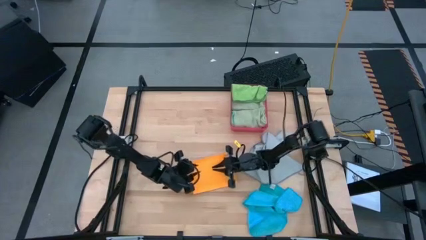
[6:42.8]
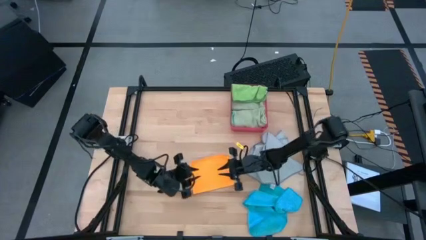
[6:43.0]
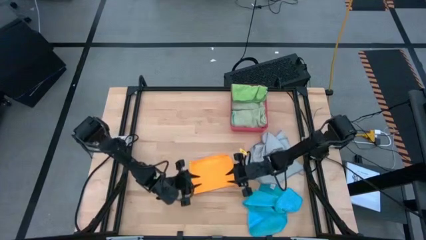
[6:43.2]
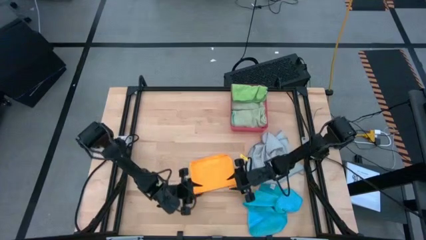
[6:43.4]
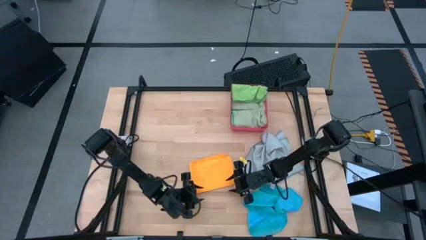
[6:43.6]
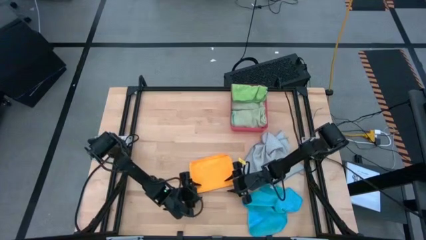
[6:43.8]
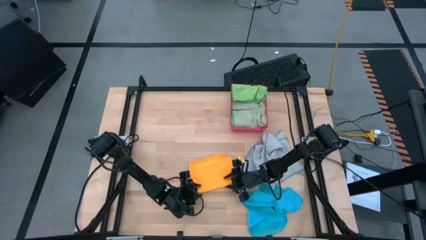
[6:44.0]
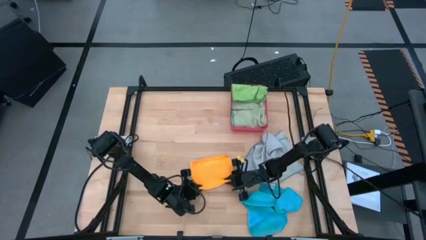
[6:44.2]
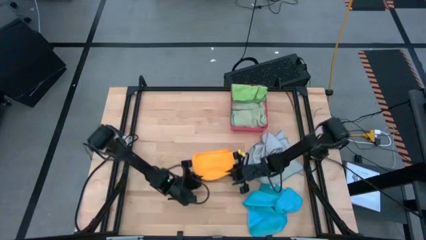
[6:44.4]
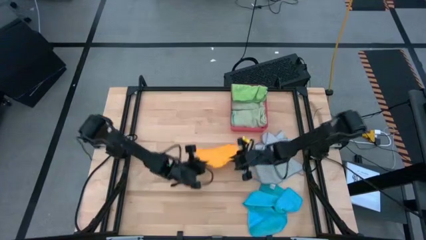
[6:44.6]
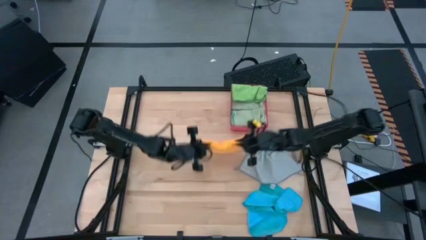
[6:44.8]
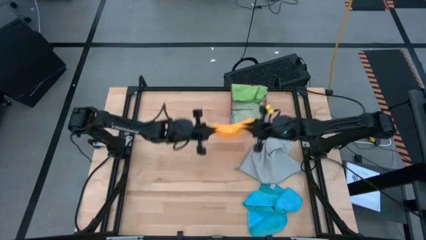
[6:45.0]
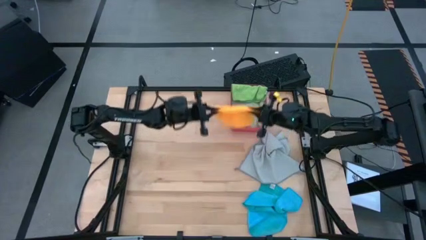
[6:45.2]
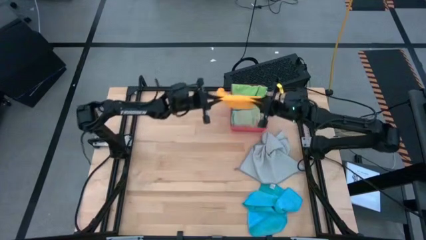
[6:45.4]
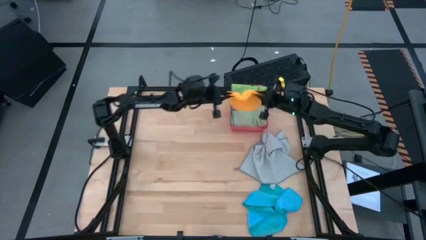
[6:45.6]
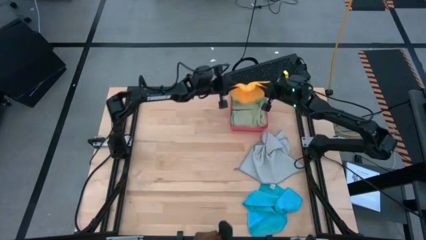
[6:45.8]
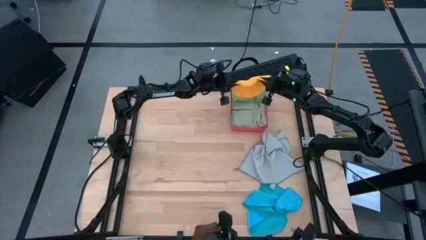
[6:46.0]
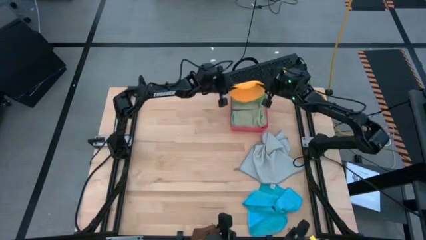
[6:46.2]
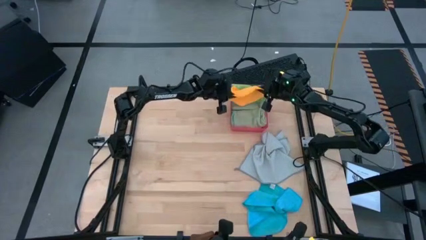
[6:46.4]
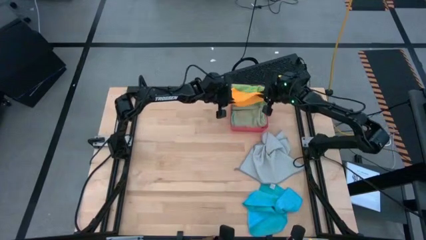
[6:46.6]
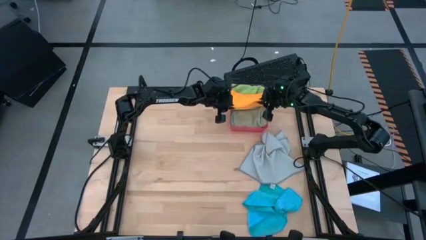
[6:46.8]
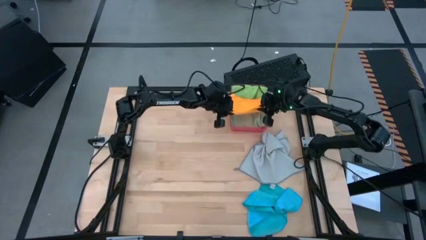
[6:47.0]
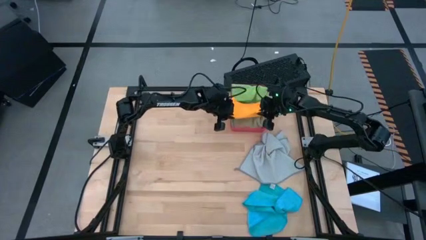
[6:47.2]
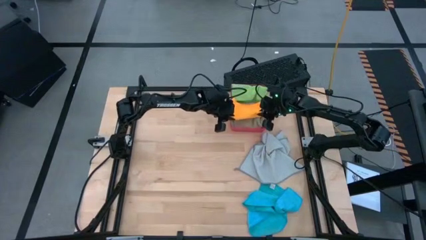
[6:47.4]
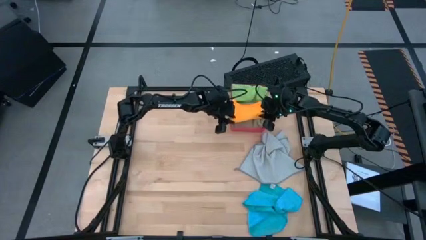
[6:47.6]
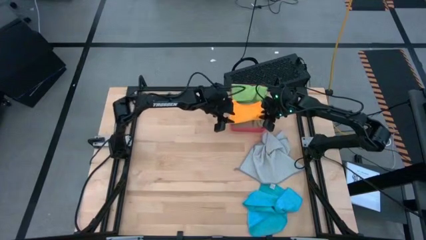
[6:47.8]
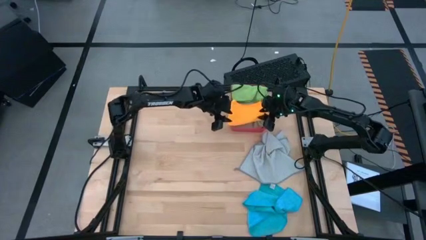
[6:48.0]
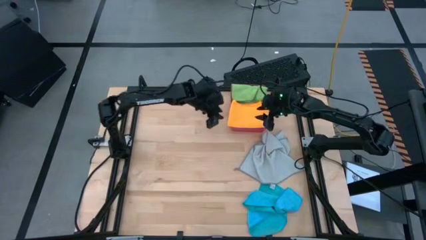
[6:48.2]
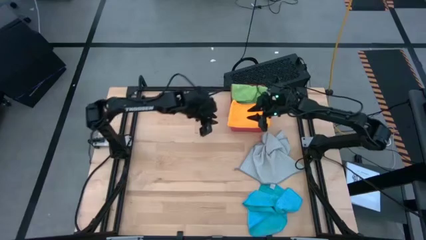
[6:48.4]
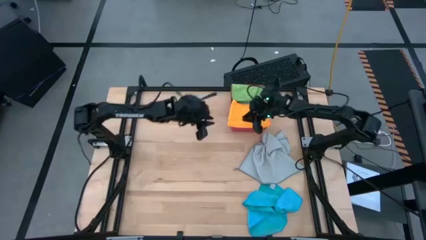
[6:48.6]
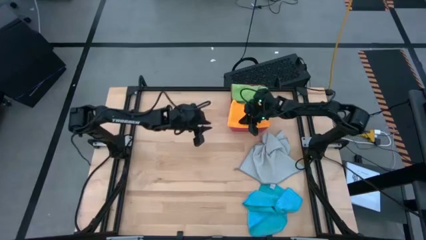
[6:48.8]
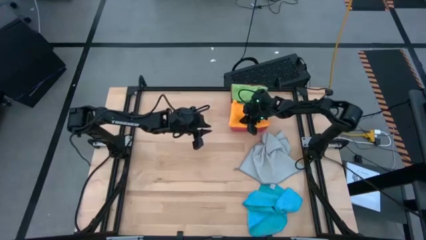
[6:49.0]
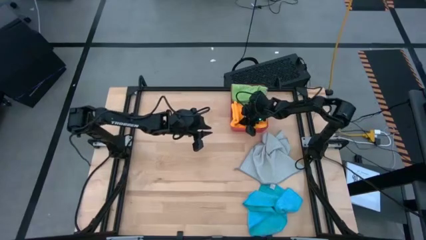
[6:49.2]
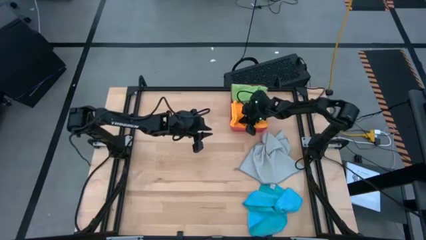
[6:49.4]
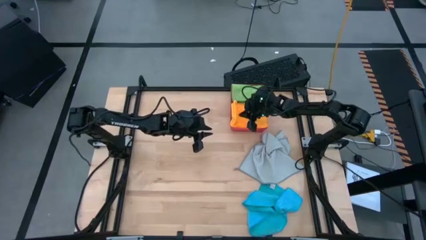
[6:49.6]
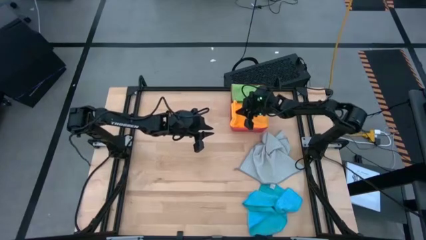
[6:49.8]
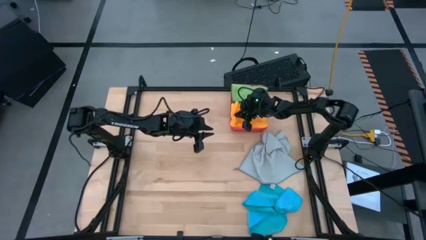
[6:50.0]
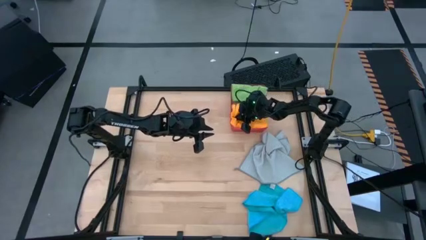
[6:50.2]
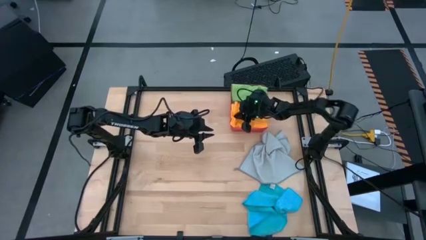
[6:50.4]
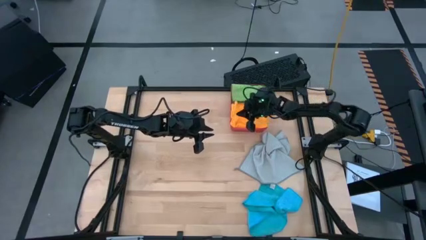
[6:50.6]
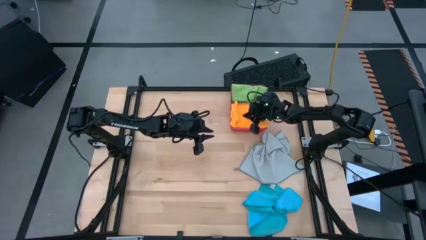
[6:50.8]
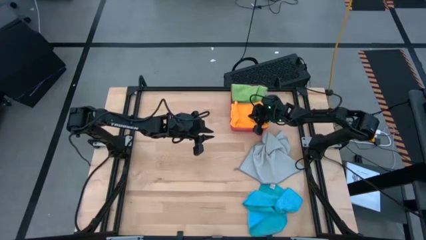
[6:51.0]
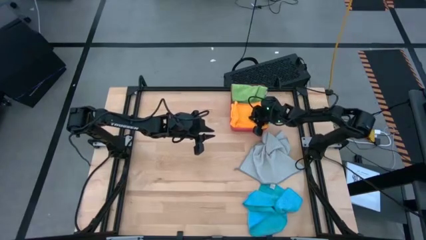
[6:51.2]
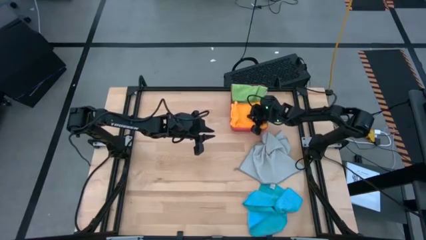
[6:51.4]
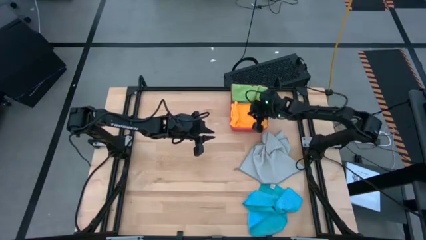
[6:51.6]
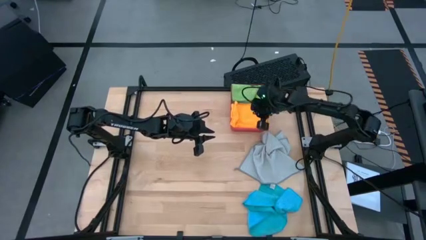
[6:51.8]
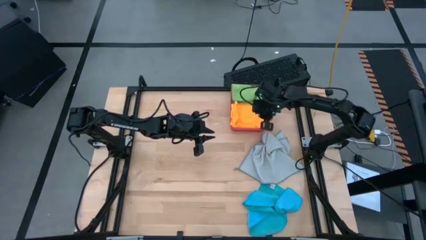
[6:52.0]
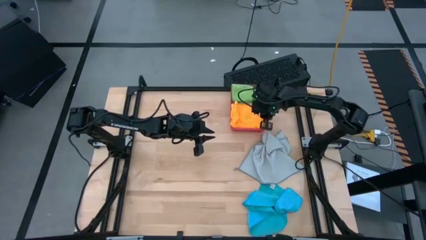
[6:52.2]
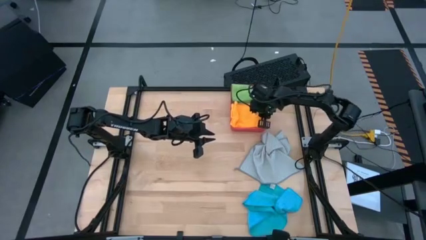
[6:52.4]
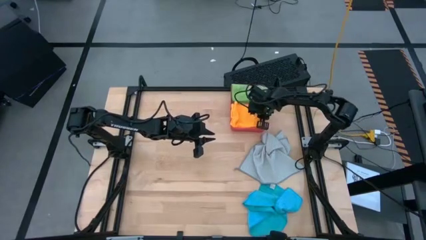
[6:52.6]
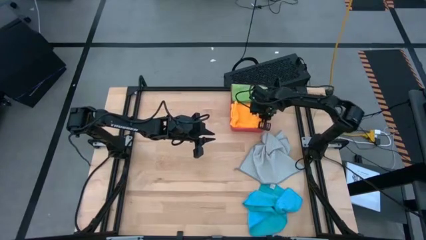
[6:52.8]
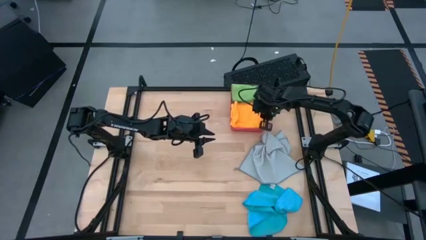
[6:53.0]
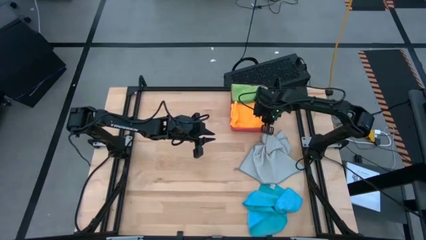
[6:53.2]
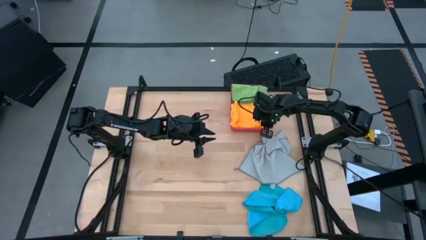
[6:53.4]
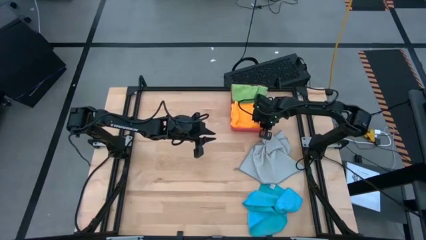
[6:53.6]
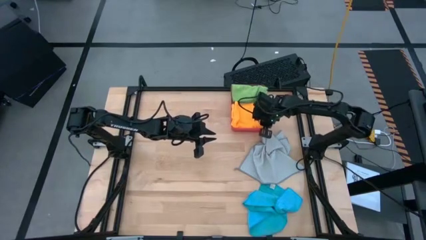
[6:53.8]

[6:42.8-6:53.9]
Task: Fold microfiber towels
Stack the yellow microfiber cloth on top of the bottom light green microfiber cloth in the red bin

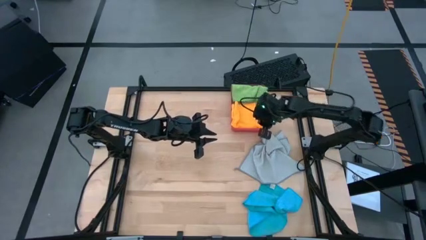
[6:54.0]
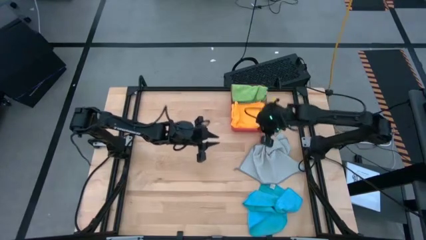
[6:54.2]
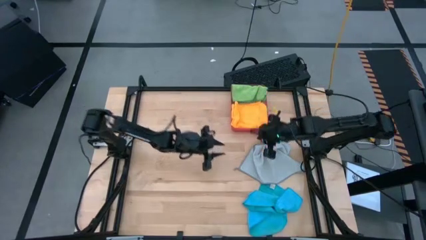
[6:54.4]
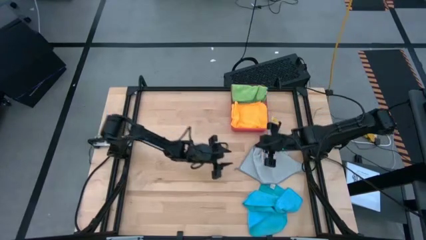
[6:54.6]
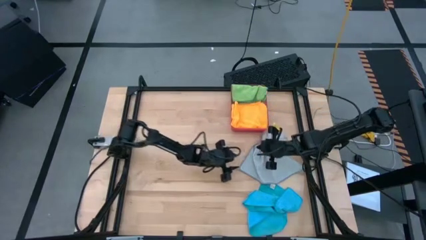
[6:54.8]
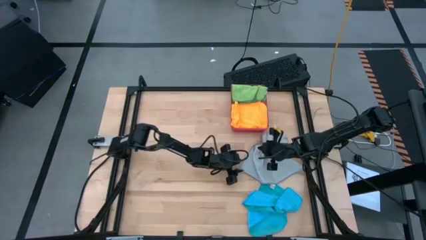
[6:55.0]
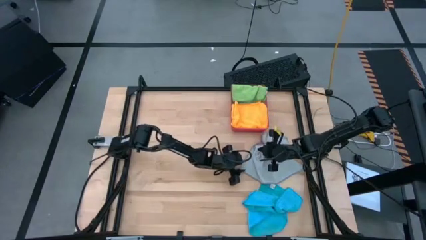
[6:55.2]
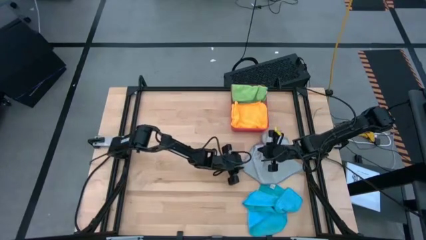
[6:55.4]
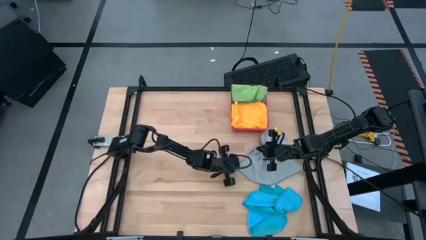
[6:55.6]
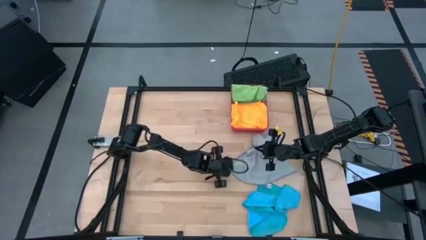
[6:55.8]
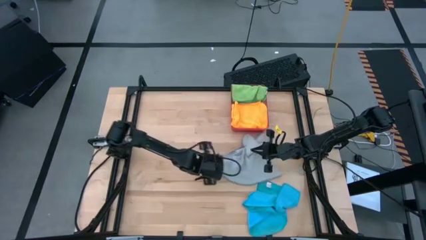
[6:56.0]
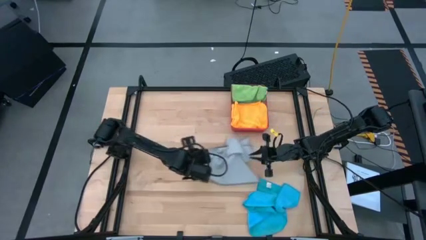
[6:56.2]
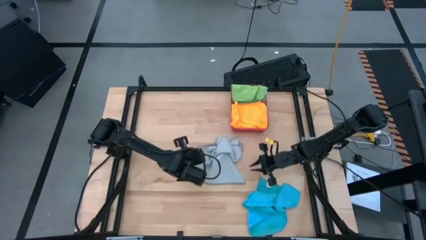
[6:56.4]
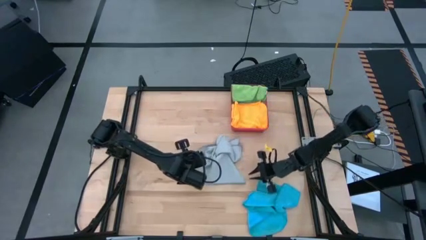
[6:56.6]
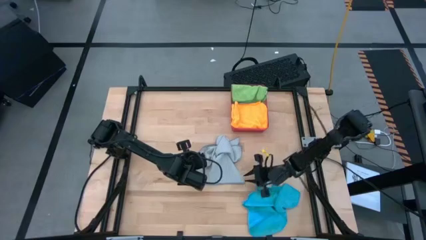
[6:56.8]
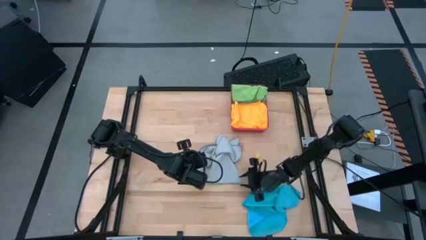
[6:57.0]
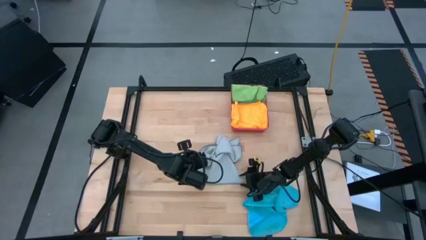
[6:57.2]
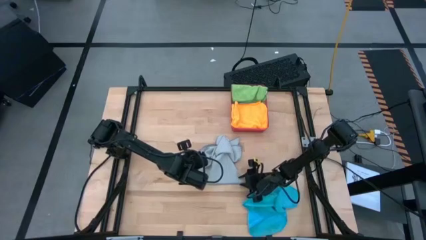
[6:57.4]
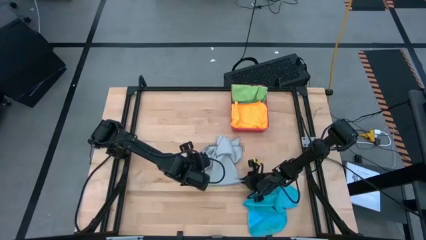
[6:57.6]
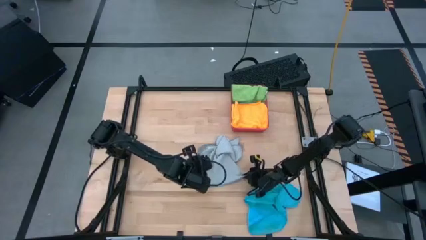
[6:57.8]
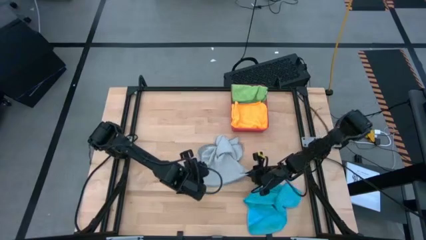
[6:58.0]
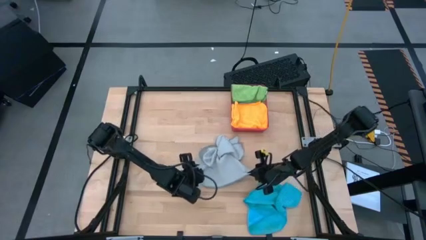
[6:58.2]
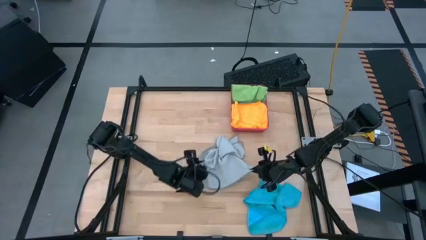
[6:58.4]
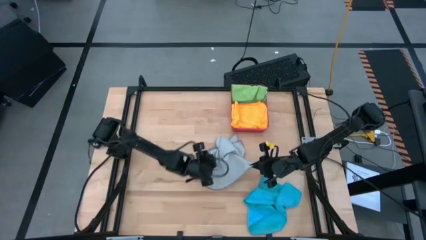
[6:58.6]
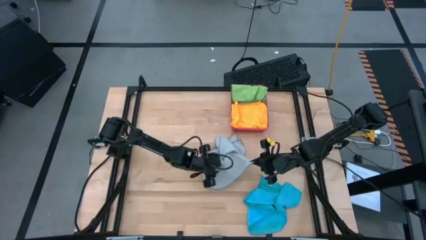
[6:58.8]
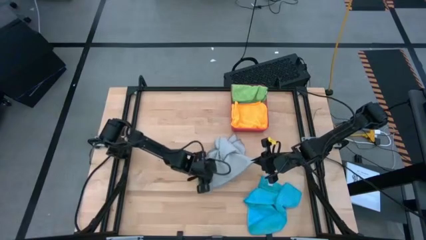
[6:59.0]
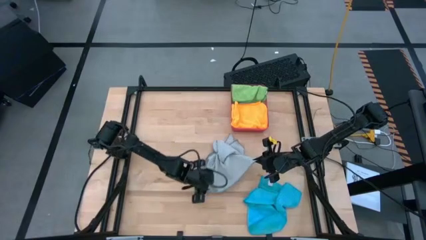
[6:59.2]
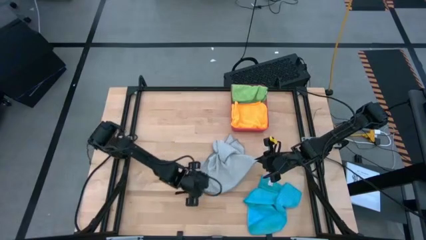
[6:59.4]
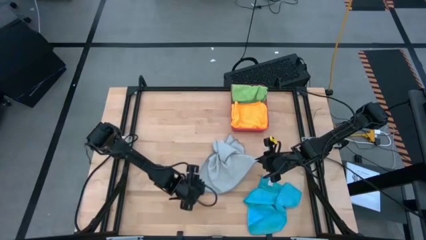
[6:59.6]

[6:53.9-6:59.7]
Fold the gray microfiber cloth
